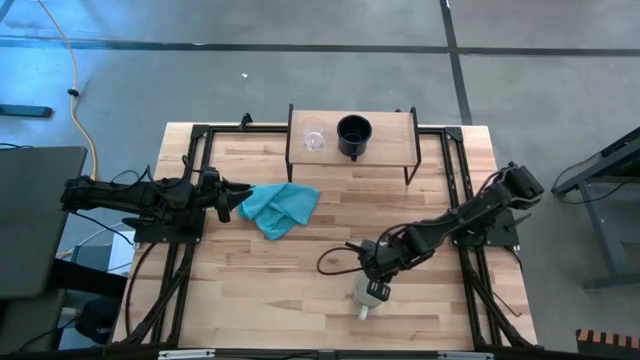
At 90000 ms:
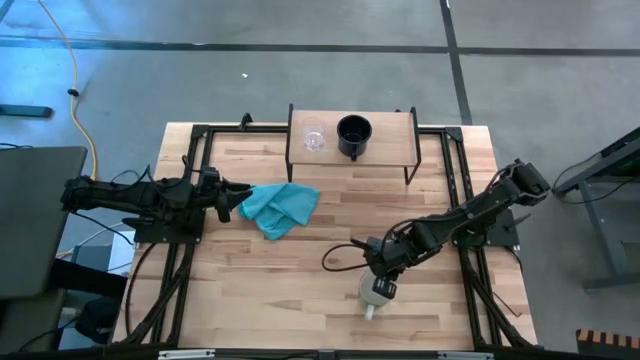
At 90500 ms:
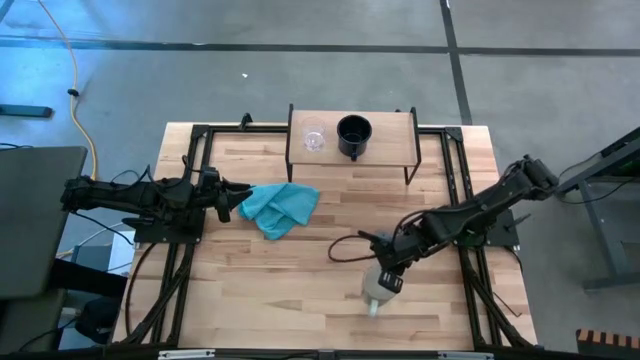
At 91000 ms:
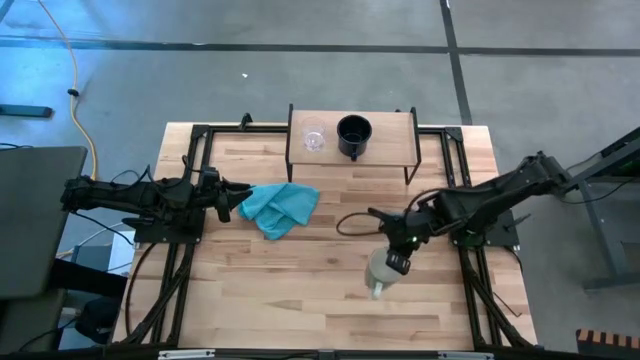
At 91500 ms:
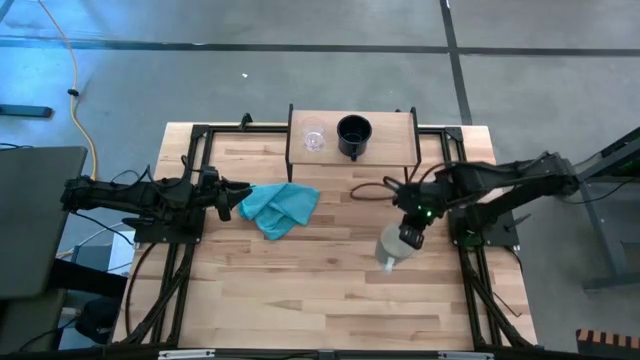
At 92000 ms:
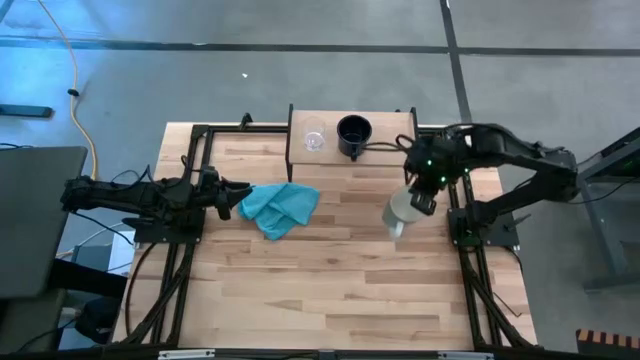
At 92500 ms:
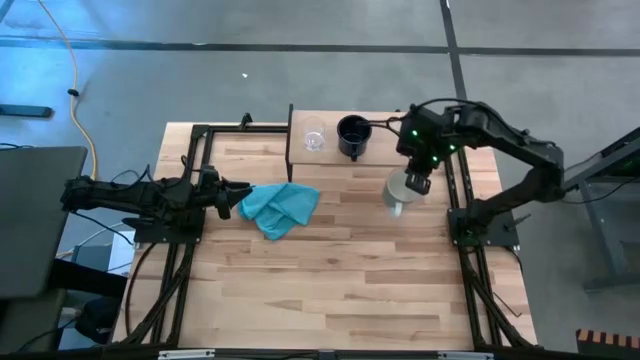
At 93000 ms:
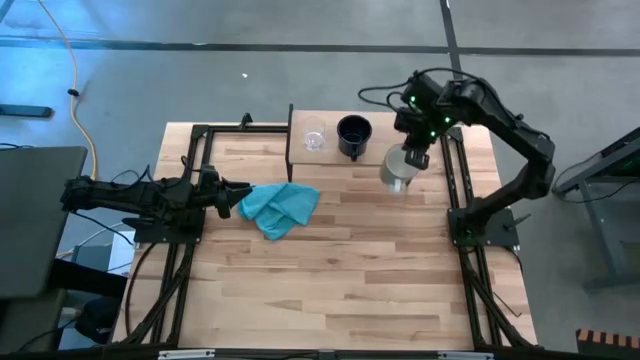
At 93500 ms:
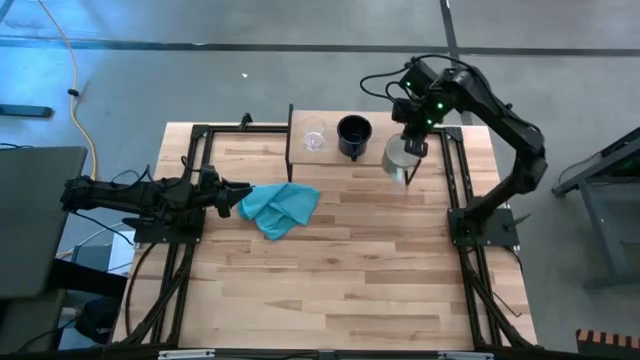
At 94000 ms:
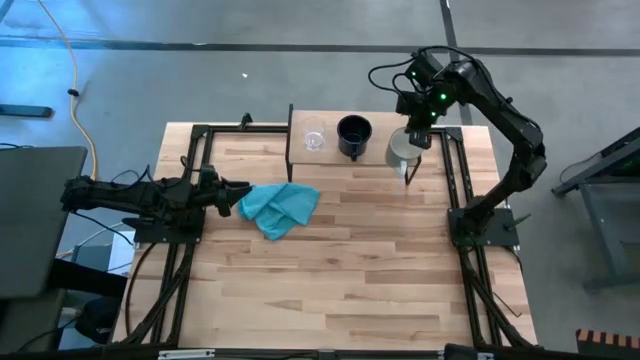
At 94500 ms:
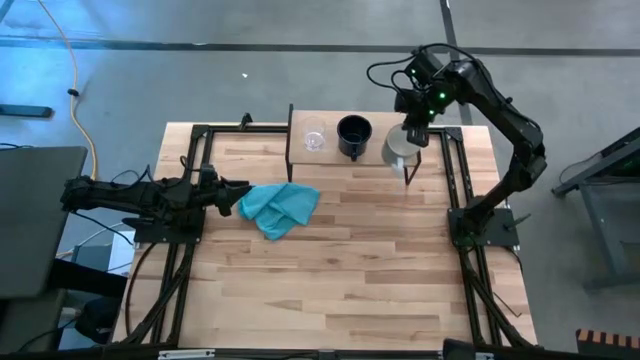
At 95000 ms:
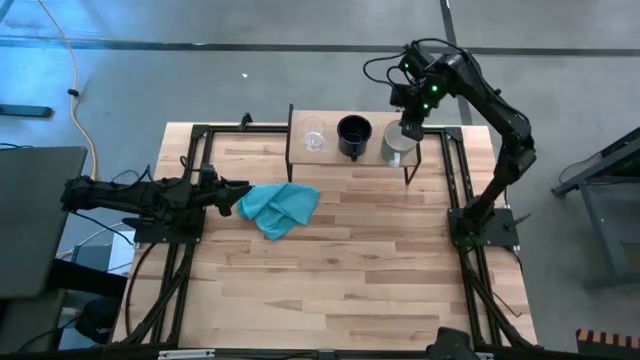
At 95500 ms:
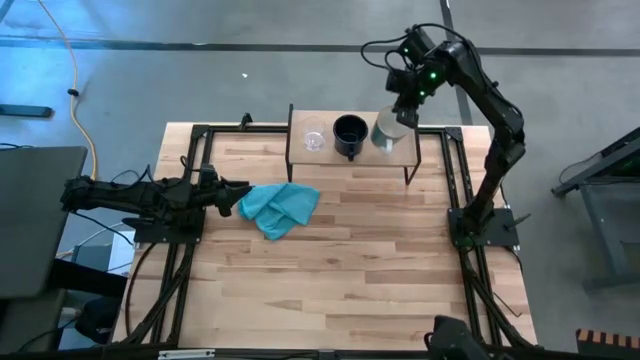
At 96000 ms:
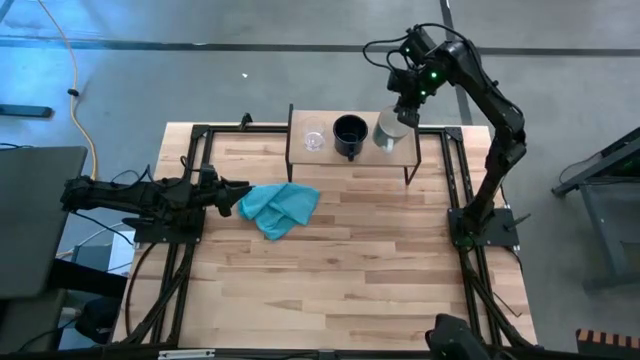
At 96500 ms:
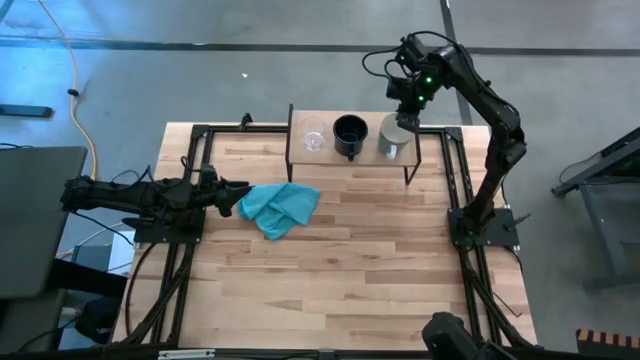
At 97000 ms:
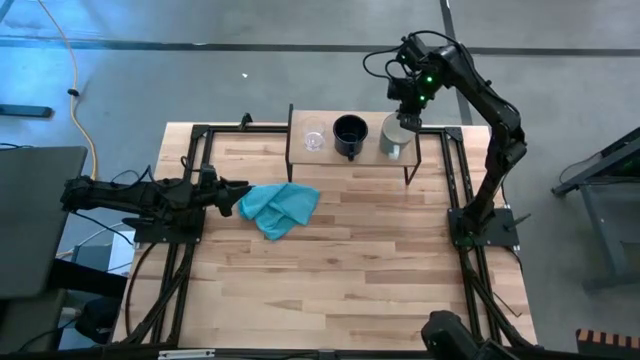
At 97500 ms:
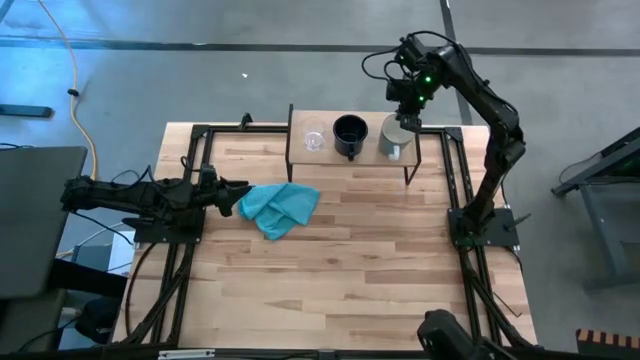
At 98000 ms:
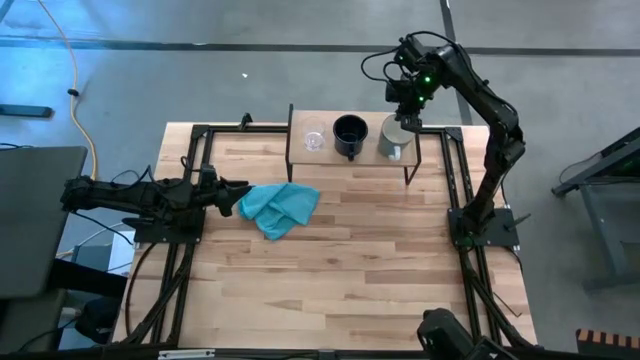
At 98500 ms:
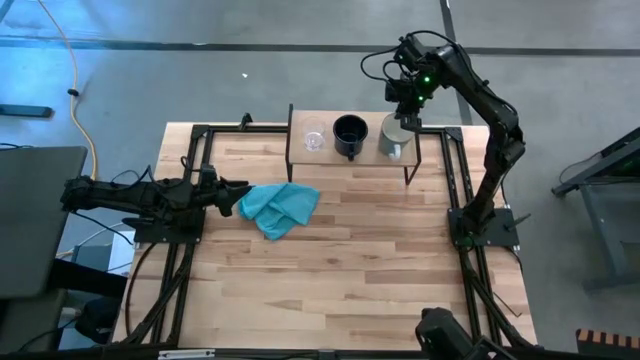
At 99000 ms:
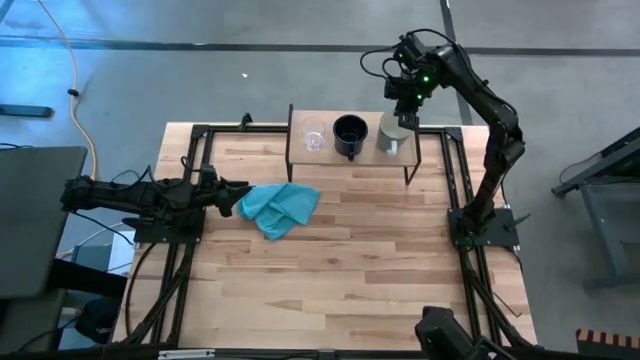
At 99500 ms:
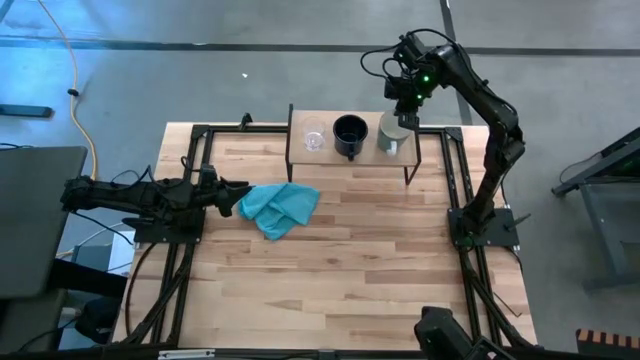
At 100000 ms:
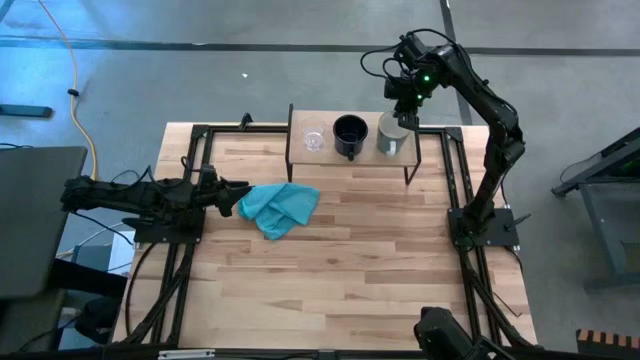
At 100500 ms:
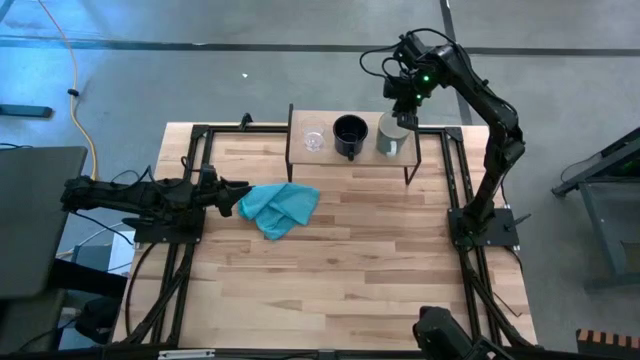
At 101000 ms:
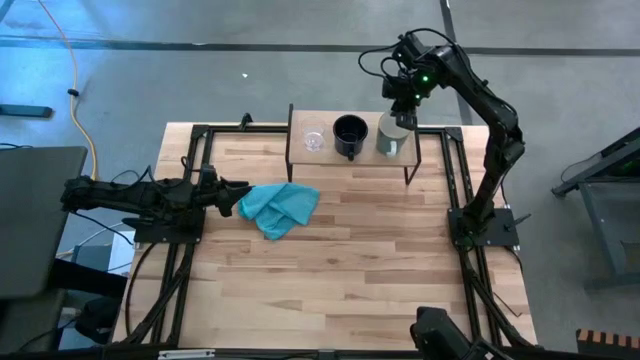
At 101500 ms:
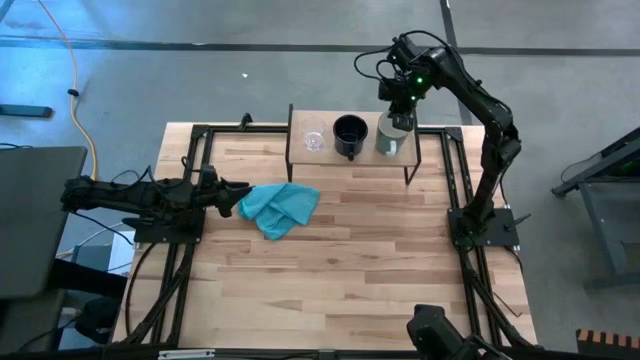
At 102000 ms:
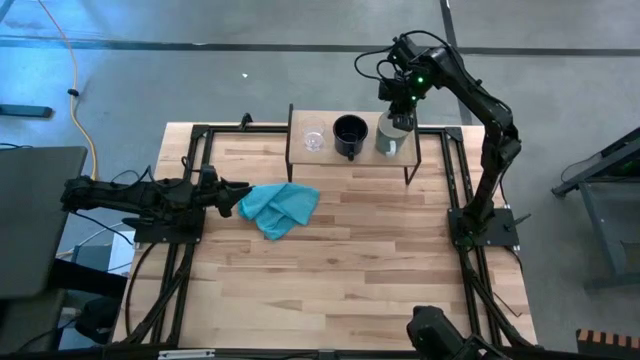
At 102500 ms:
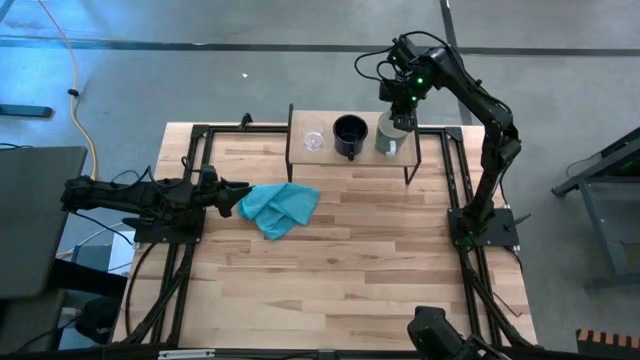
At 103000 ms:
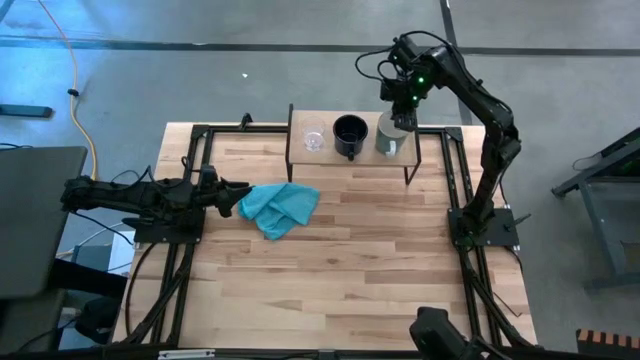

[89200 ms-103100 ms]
Task: Stack small to large cups/mugs on shelf
Put the light blue mug on the shelf

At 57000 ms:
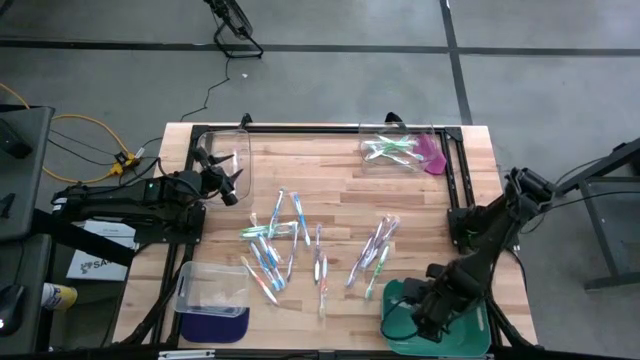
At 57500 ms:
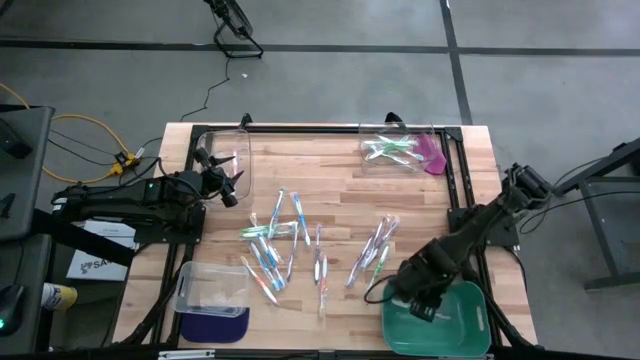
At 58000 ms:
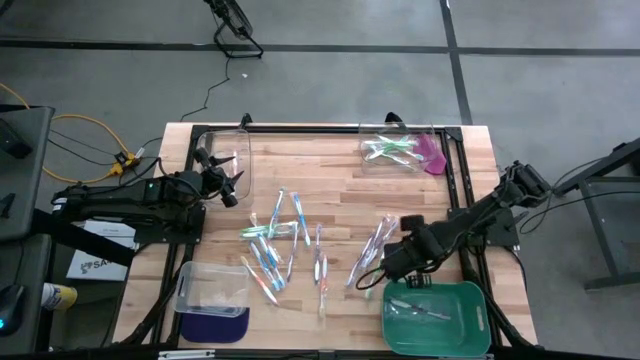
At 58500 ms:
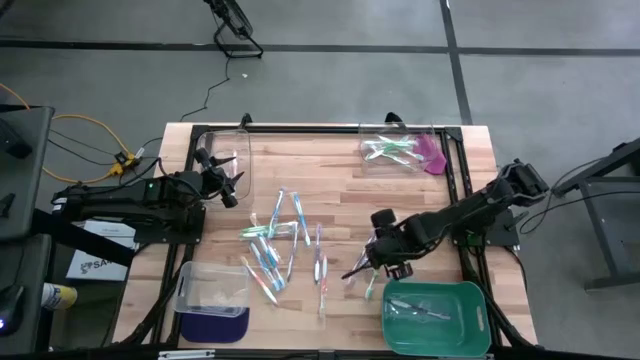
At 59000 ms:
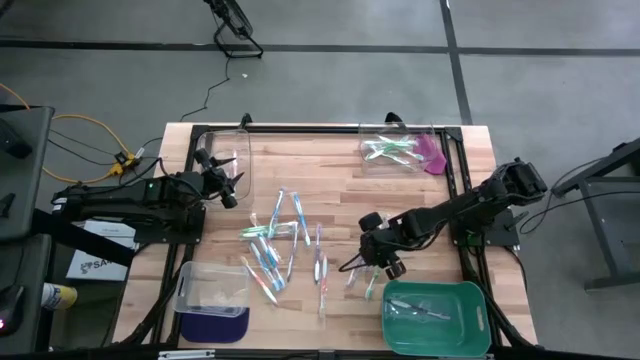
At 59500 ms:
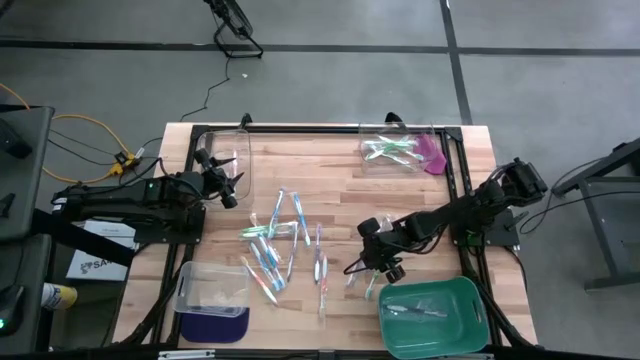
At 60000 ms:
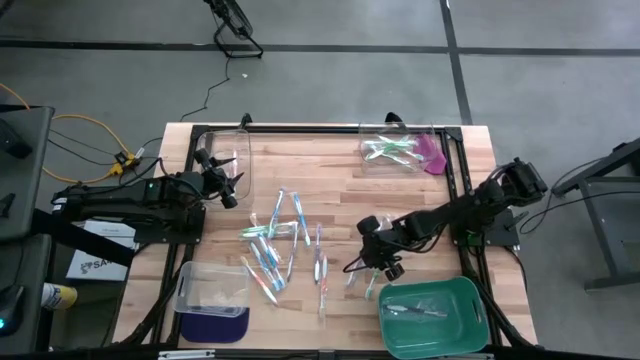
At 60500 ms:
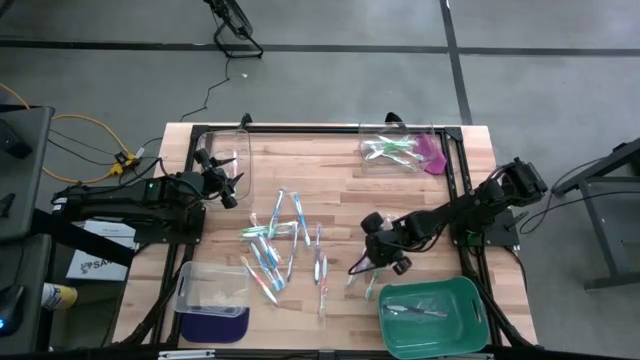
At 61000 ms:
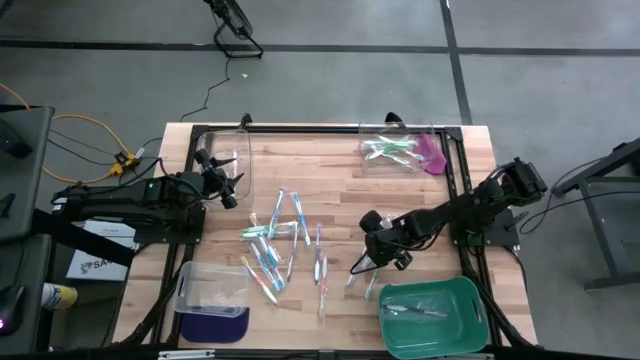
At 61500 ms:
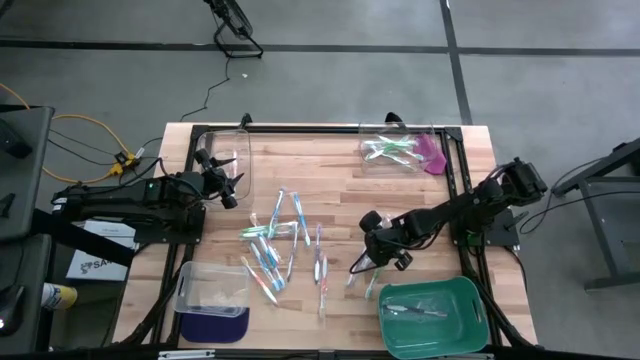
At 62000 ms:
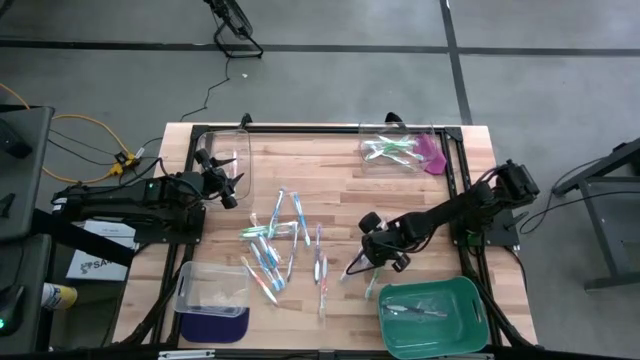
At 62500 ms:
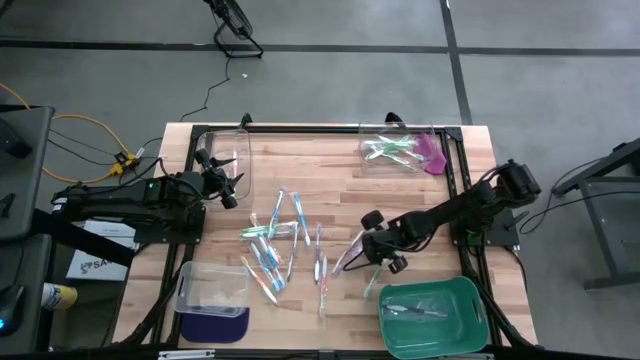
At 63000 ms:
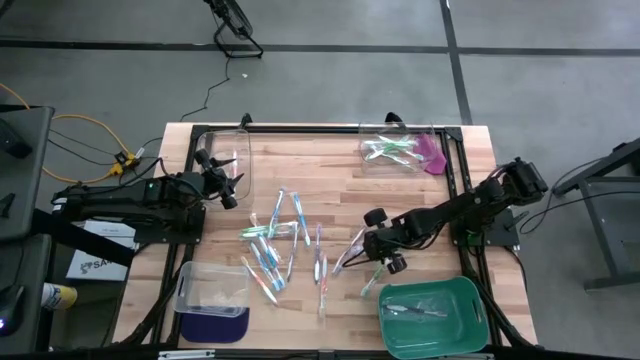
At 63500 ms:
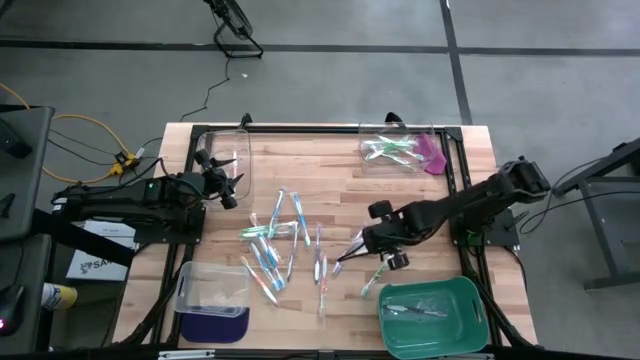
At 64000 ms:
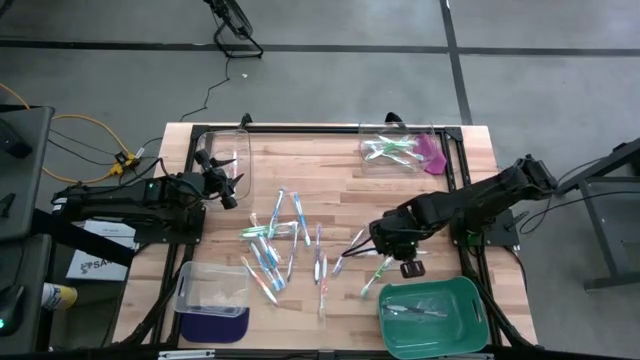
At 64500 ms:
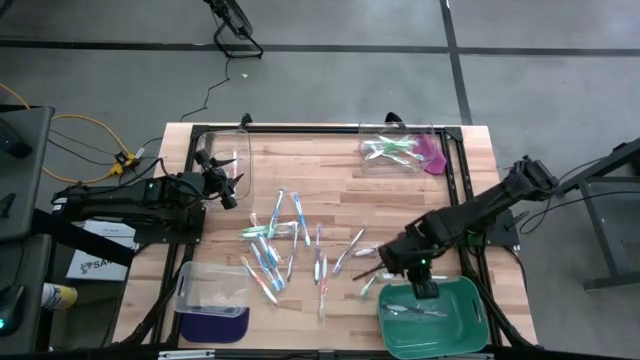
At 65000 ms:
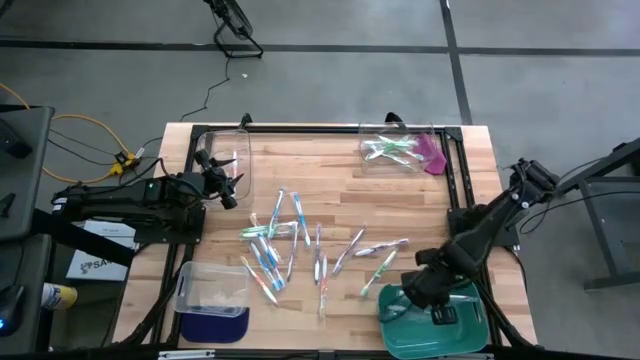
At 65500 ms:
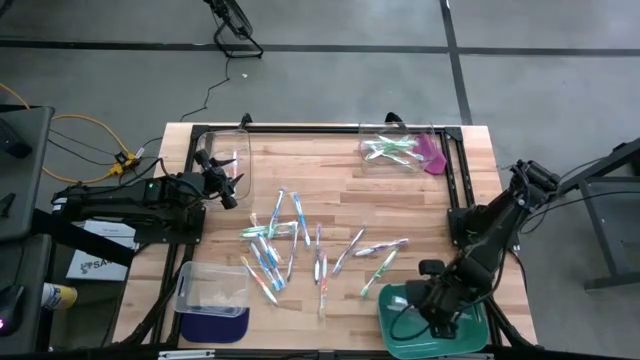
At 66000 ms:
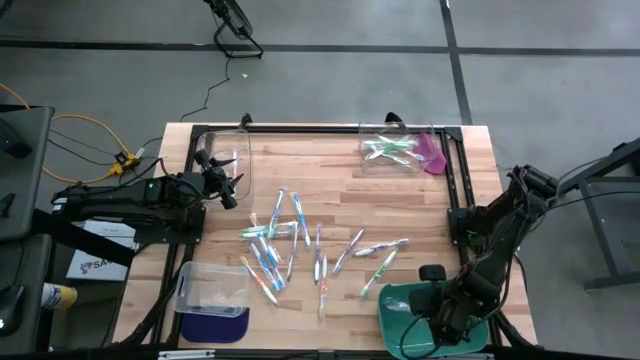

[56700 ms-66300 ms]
Task: Pick & Place Toothbrushes
Put the violet toothbrush into the green bin
